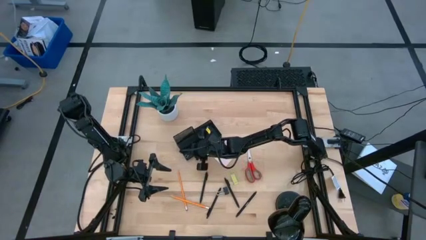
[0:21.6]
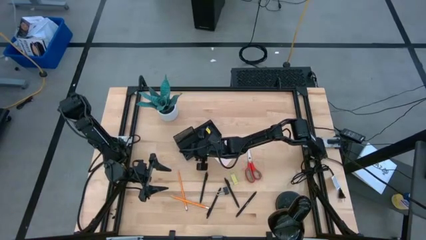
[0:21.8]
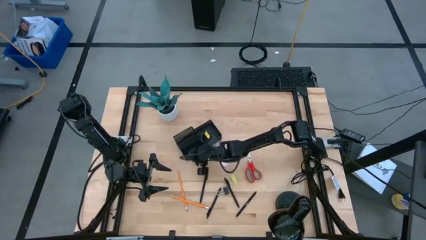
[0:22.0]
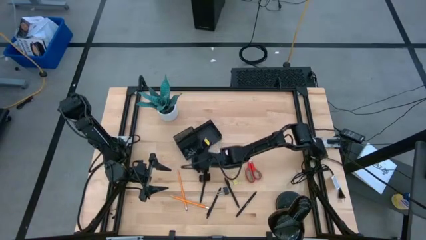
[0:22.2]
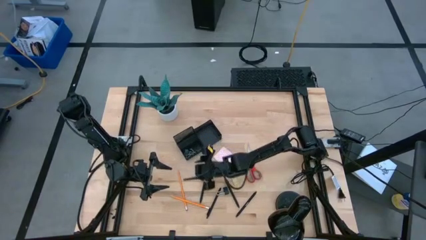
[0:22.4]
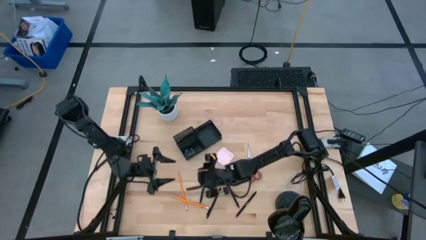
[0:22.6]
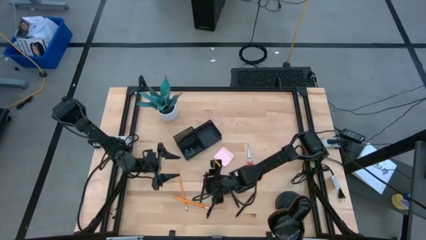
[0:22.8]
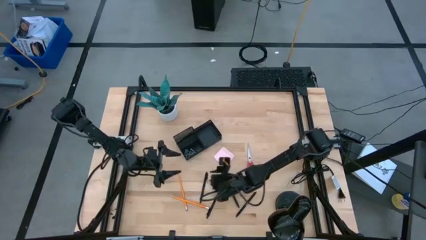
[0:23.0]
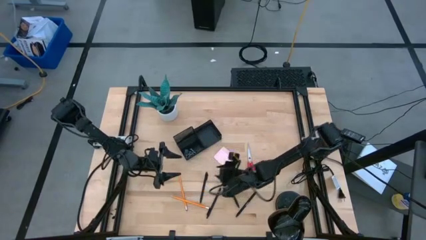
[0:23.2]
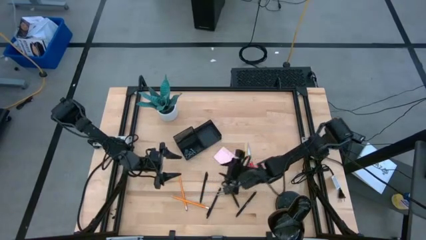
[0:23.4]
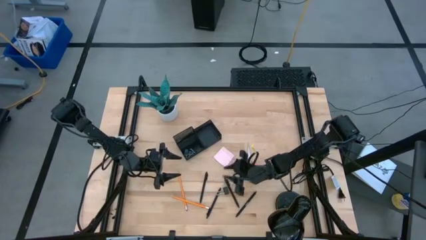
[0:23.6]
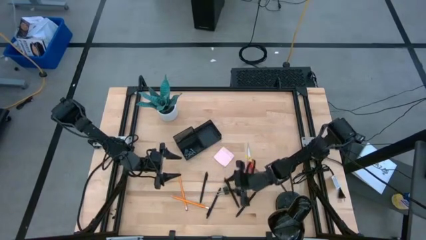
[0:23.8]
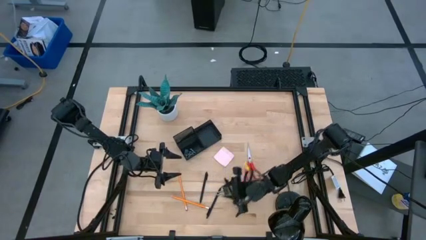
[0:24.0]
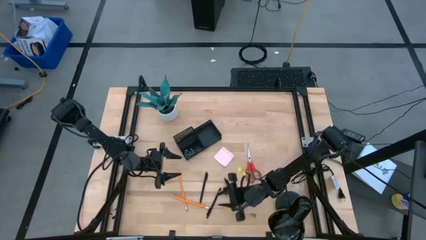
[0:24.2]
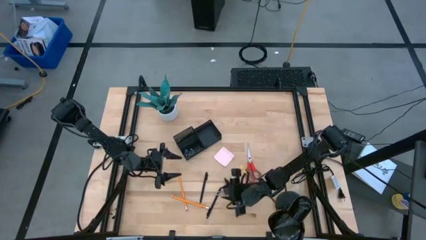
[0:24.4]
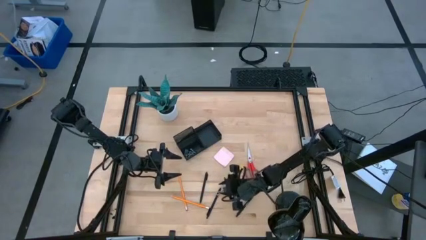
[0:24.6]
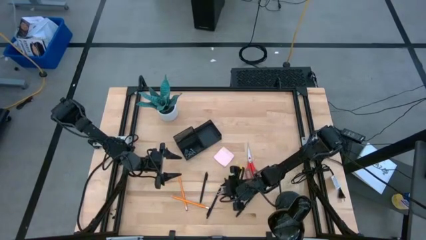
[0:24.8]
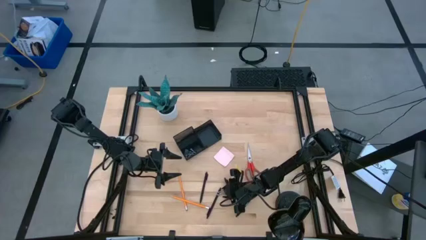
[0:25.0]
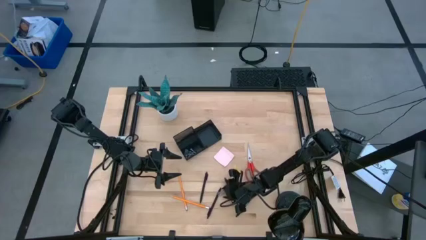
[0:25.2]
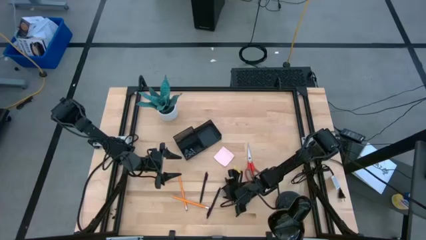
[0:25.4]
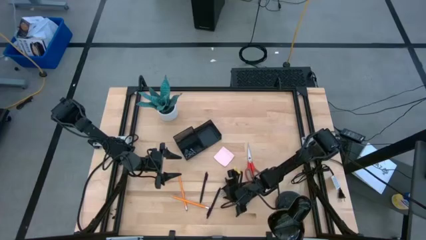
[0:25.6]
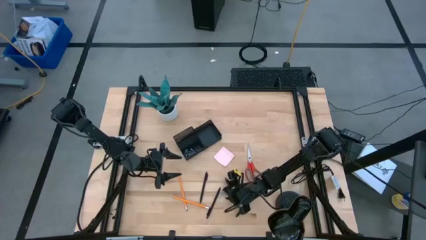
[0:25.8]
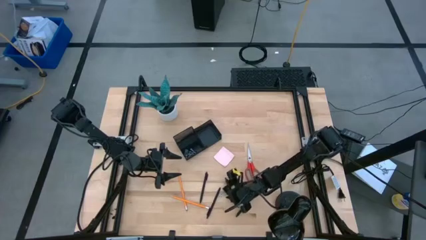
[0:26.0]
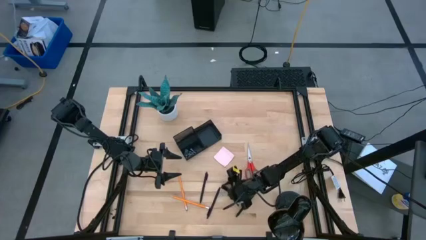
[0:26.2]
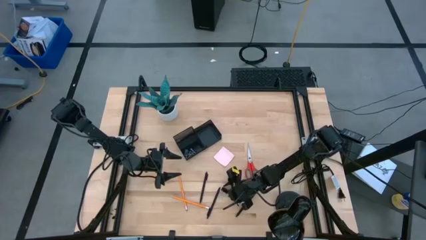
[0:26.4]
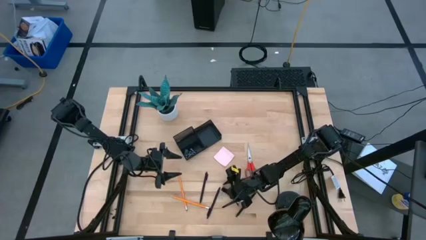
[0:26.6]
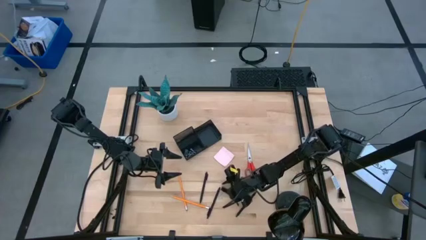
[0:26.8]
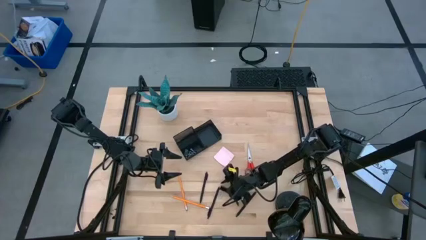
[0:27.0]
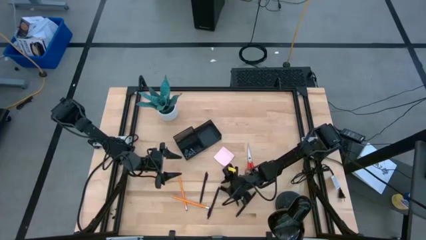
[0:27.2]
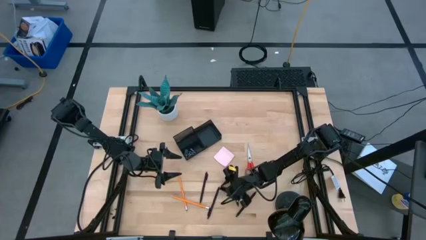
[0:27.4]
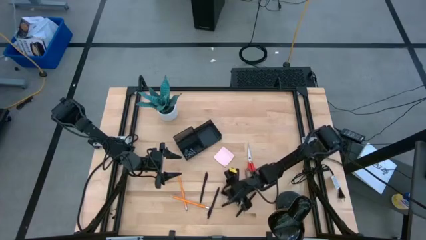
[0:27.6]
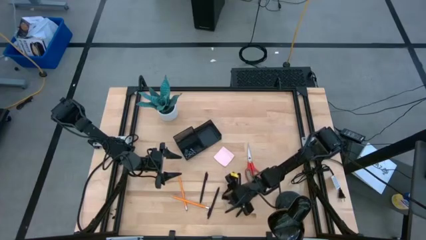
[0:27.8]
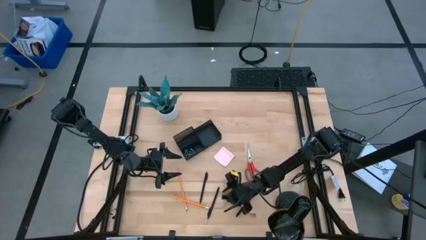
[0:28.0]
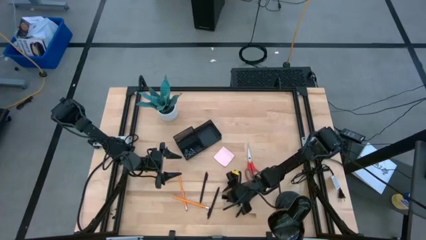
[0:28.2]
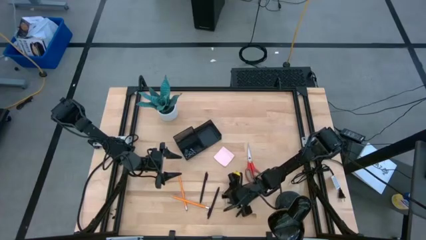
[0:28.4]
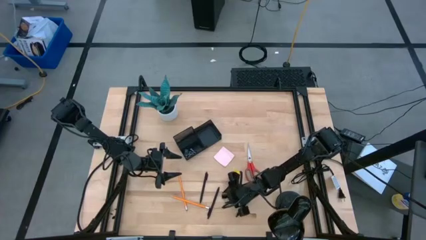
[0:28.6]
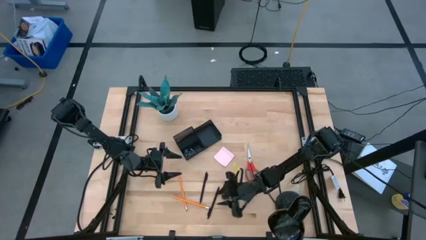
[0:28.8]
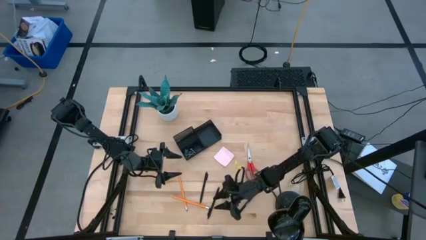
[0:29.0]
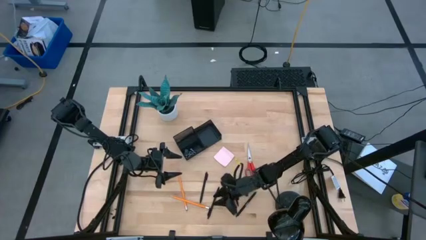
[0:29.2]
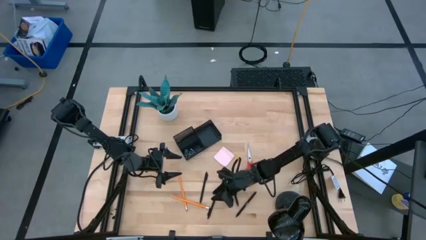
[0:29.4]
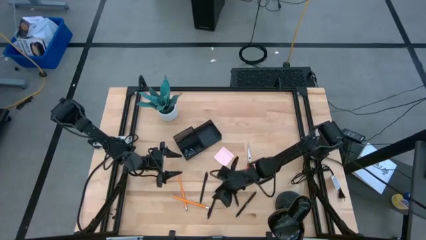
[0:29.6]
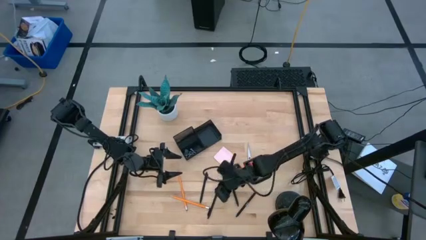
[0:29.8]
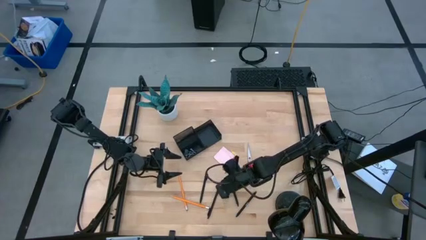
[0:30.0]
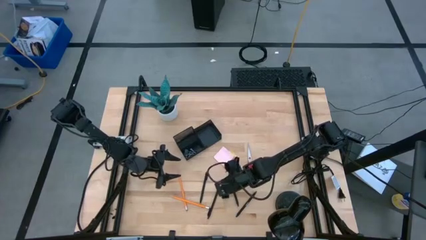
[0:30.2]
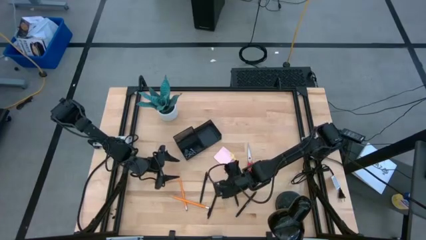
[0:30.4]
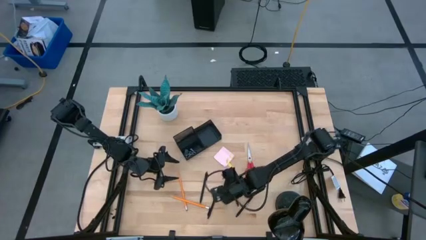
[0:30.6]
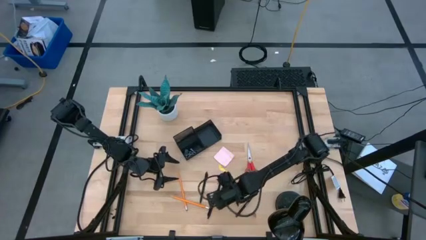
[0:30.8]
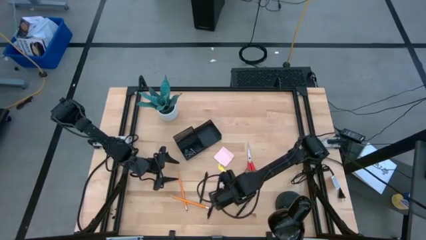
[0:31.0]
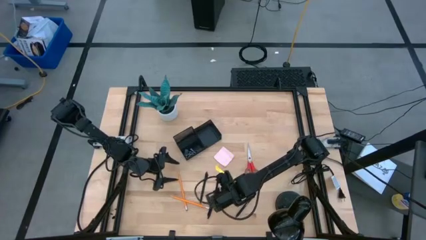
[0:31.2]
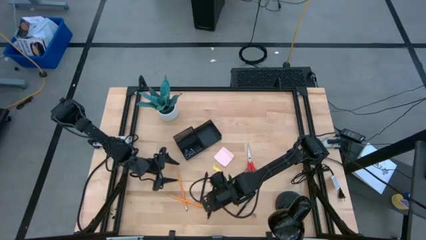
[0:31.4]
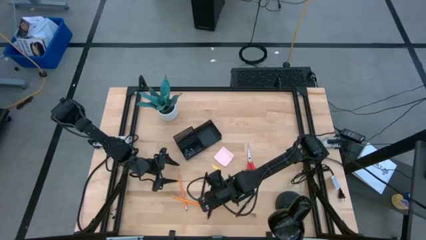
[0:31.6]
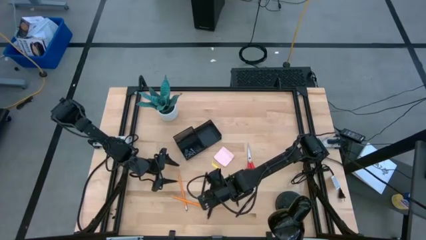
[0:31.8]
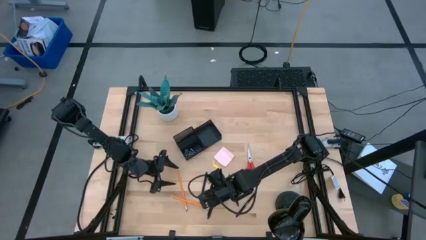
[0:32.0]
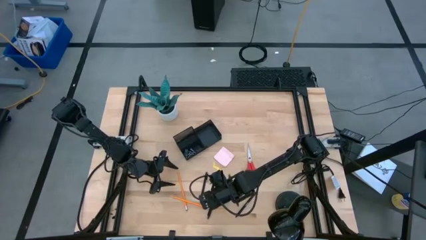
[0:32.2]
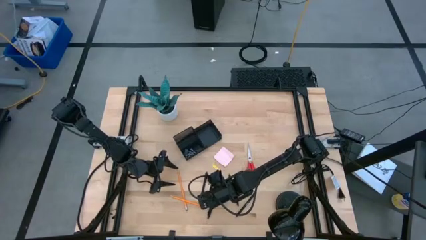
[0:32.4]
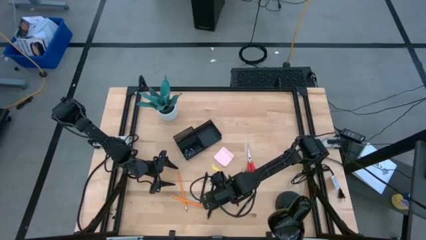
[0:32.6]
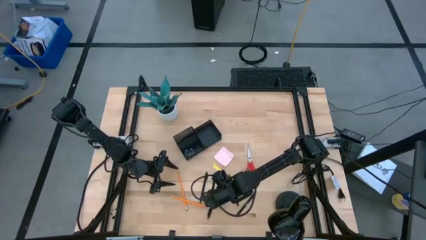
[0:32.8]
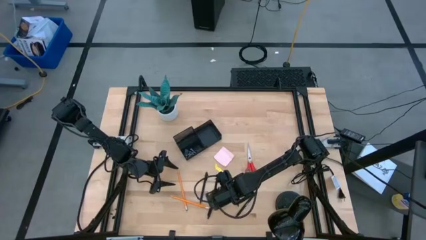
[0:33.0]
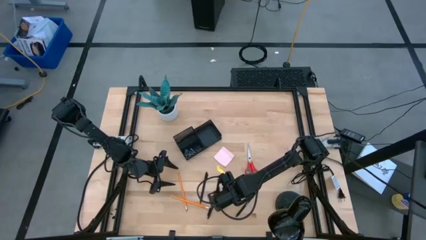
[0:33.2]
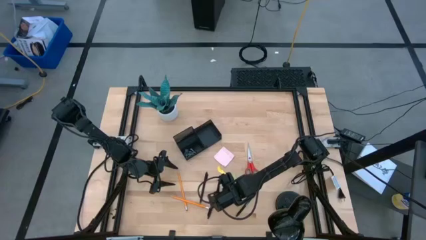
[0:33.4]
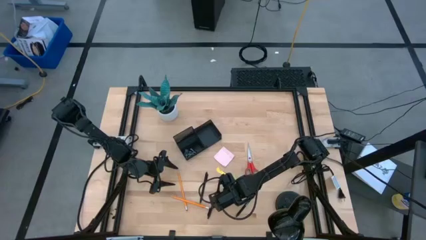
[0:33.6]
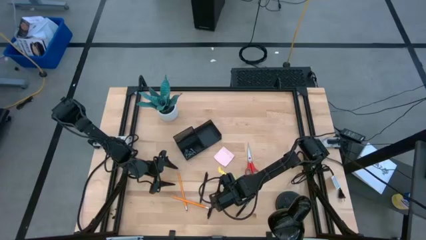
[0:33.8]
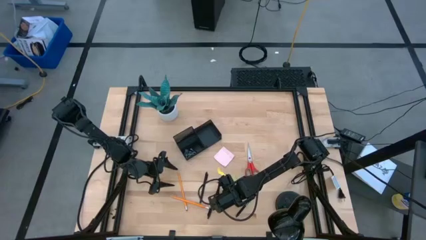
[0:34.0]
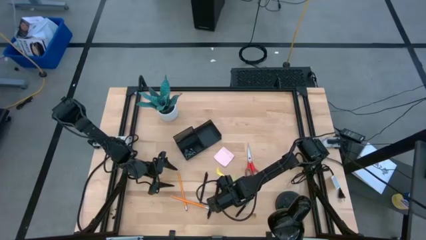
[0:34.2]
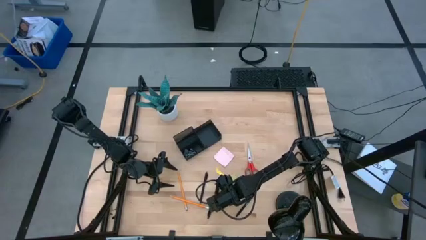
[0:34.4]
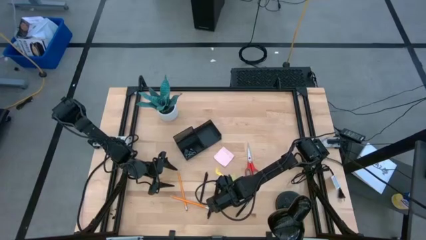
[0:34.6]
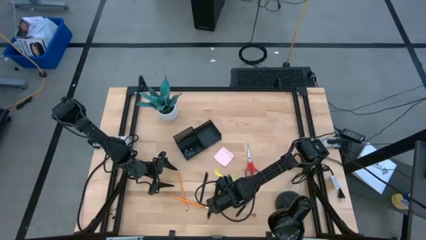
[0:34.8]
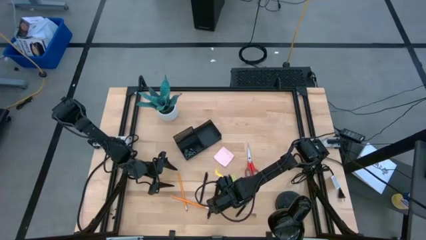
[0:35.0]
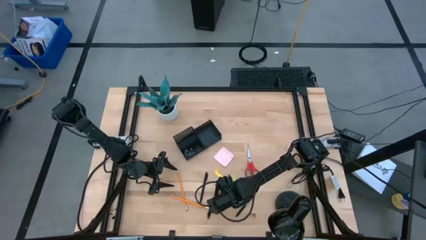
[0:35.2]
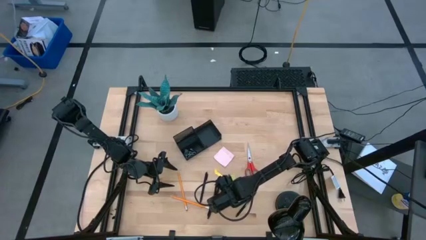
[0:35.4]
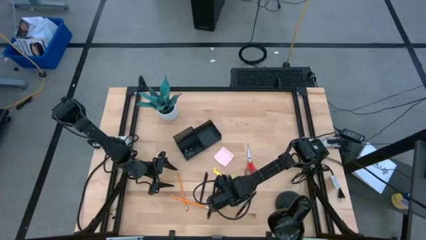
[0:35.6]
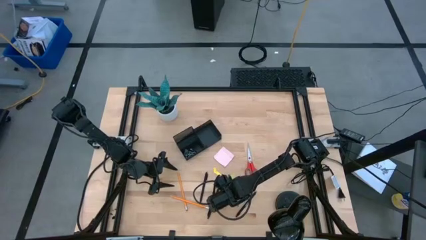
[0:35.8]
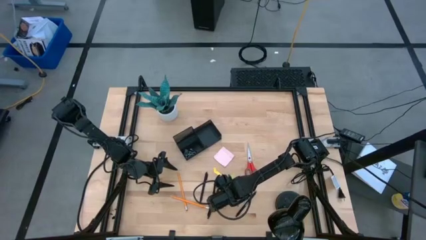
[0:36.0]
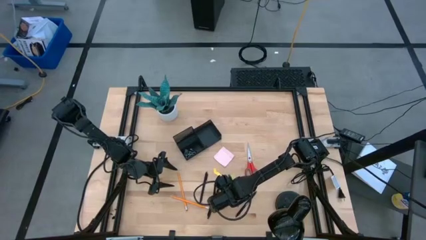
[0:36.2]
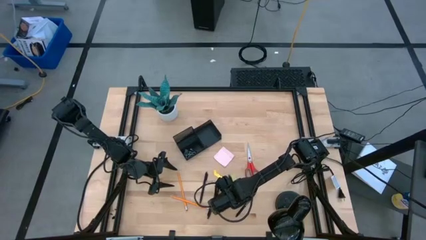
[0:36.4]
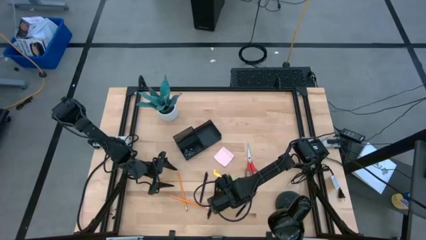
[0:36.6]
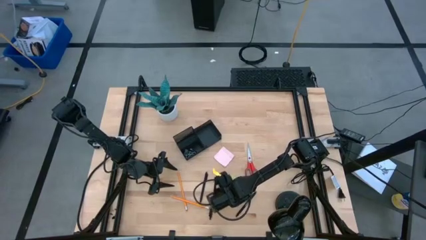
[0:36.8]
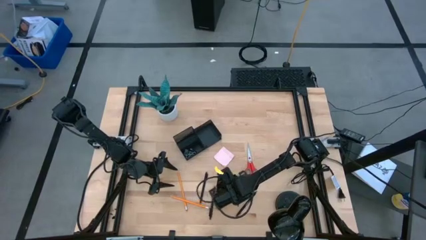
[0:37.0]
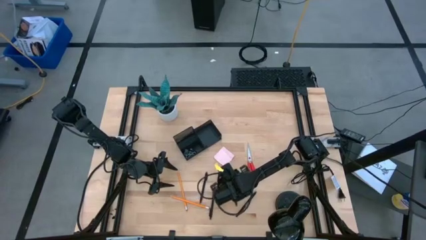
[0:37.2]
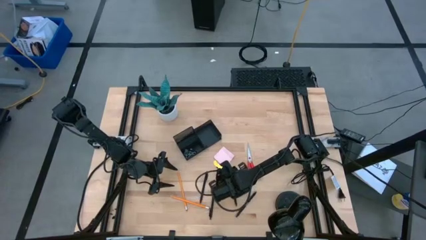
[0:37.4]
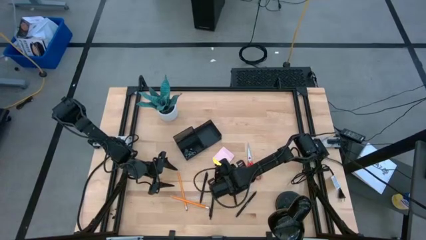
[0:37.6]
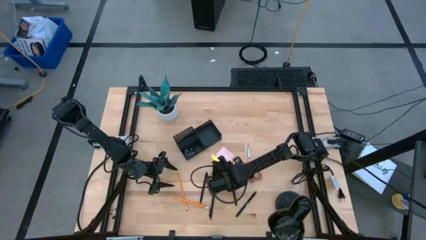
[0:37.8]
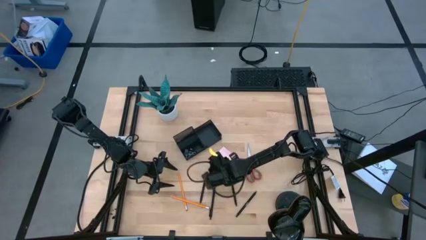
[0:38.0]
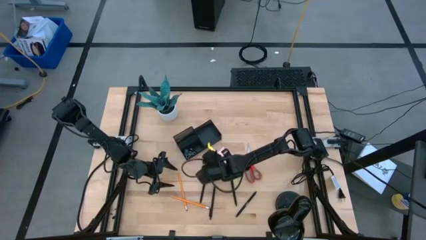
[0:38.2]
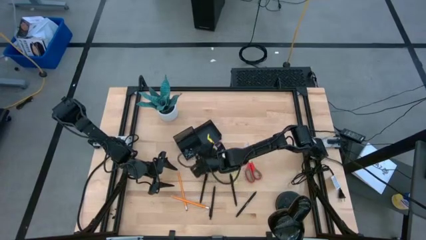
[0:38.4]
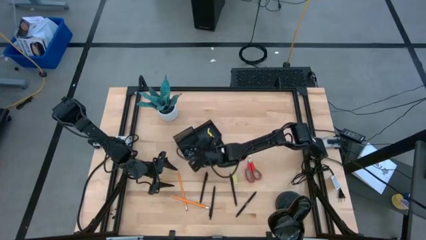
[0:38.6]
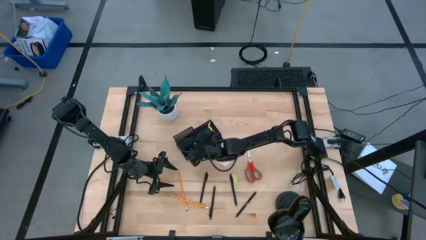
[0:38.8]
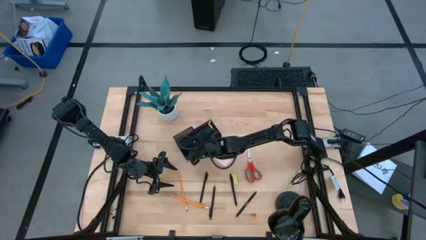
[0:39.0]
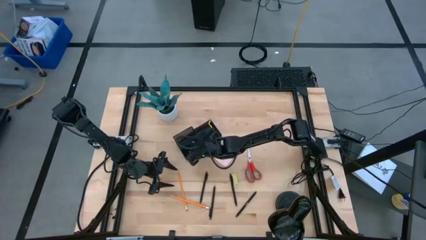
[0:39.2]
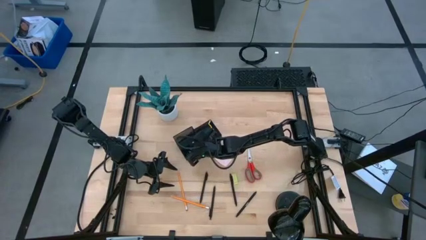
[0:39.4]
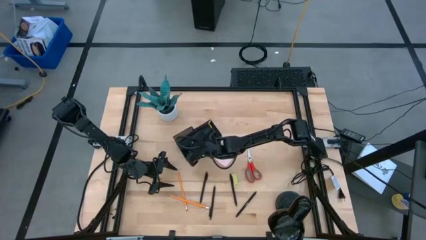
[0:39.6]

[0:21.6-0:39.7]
Task: Pick and place office supplies into organizer
Put the black binder clip into the black desk organizer
